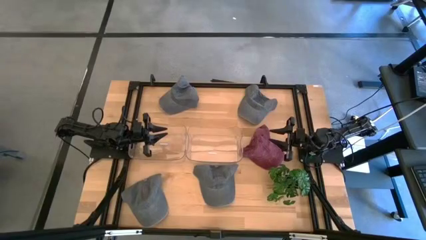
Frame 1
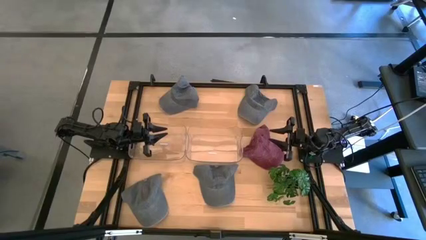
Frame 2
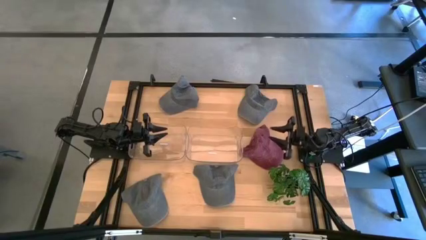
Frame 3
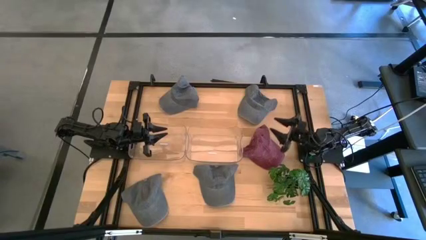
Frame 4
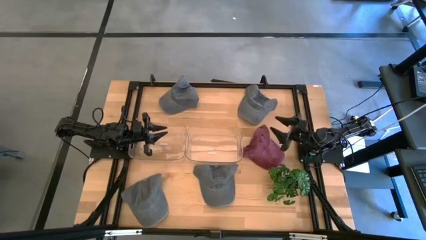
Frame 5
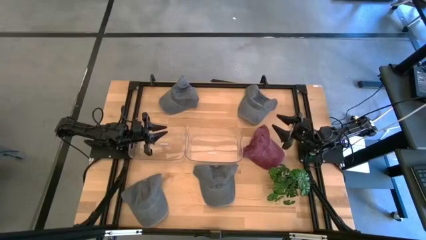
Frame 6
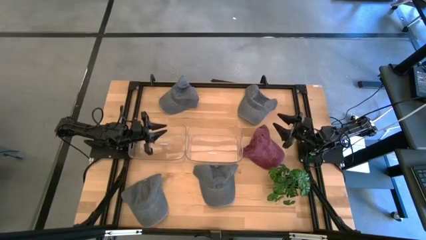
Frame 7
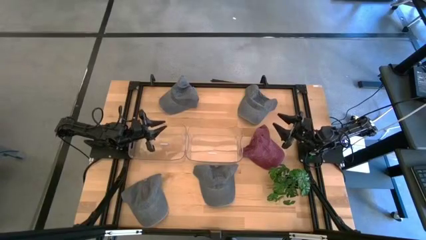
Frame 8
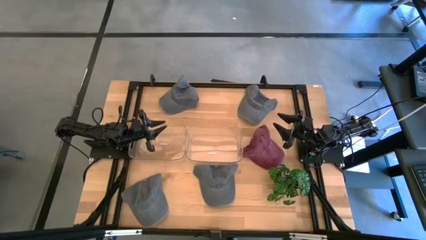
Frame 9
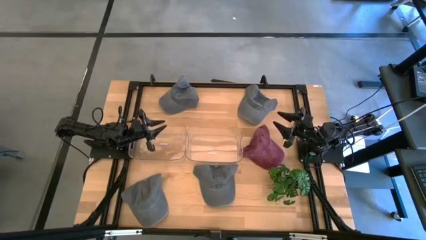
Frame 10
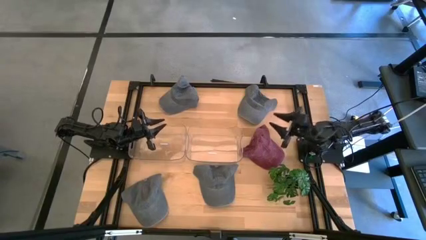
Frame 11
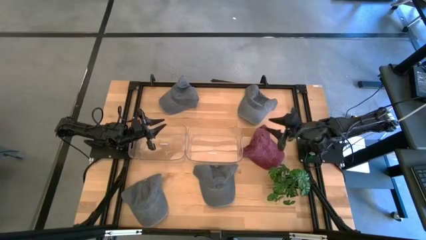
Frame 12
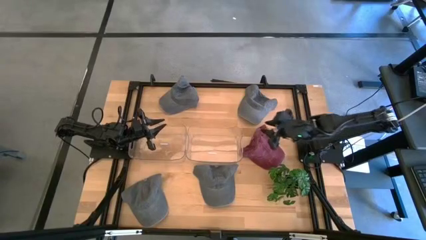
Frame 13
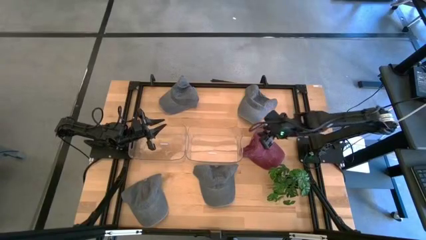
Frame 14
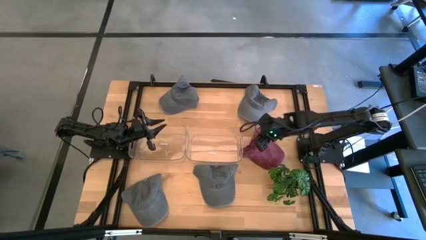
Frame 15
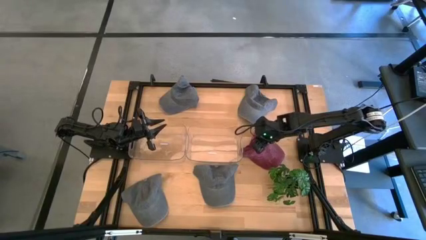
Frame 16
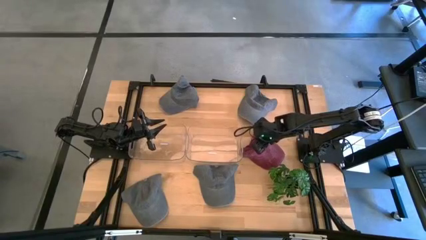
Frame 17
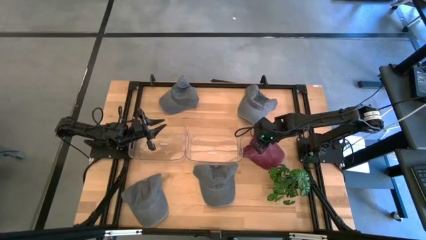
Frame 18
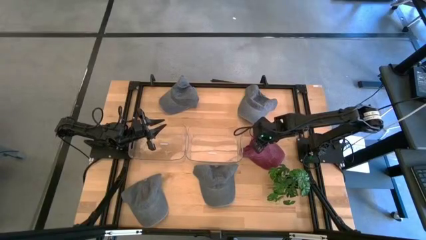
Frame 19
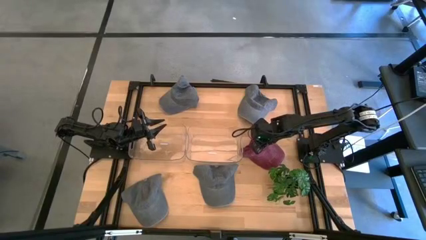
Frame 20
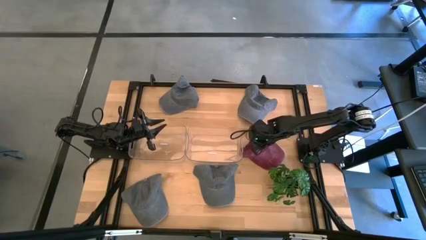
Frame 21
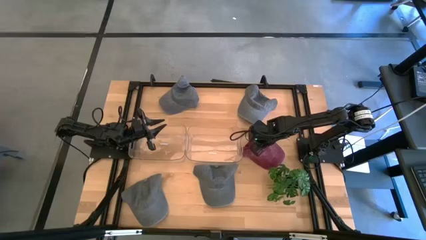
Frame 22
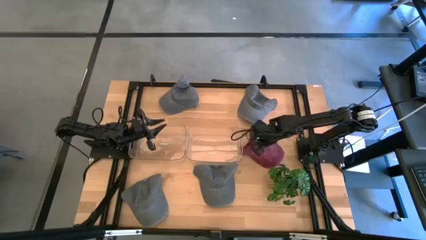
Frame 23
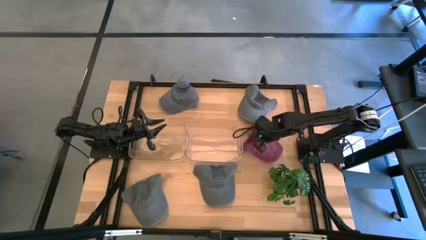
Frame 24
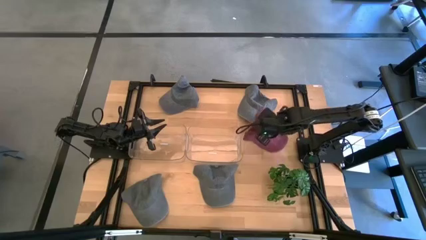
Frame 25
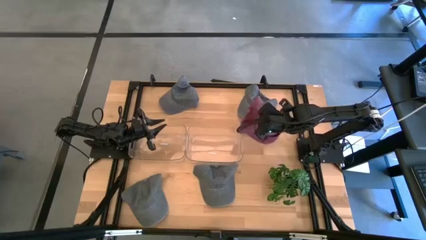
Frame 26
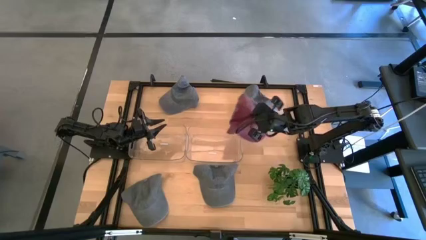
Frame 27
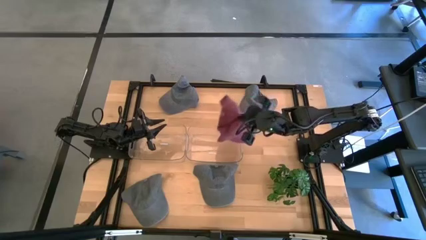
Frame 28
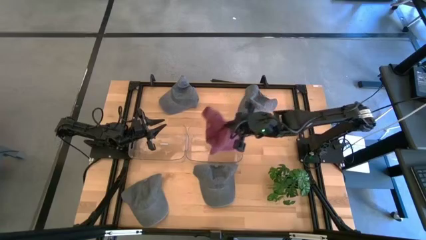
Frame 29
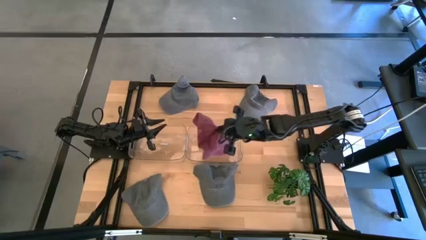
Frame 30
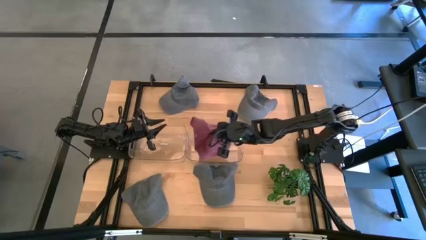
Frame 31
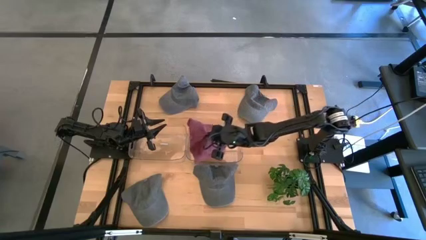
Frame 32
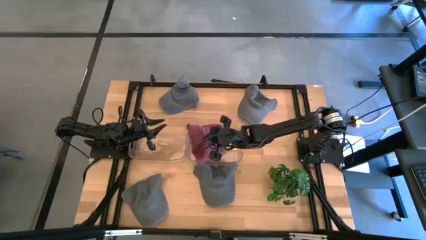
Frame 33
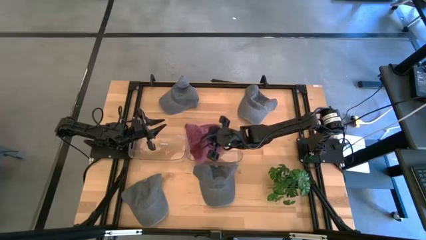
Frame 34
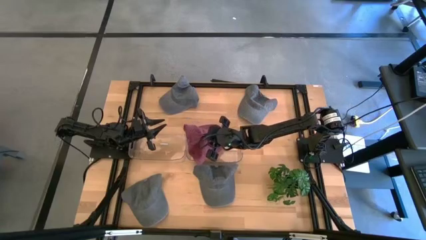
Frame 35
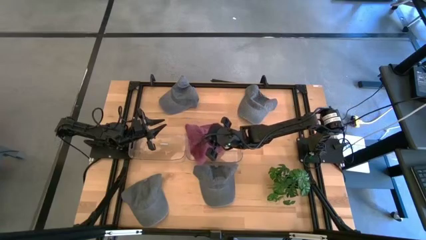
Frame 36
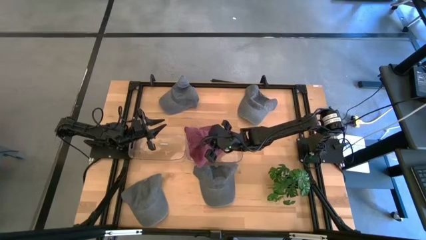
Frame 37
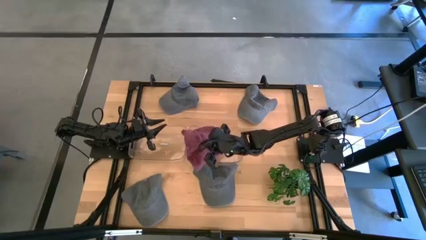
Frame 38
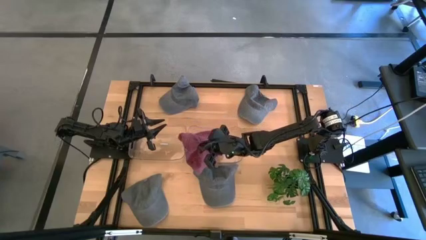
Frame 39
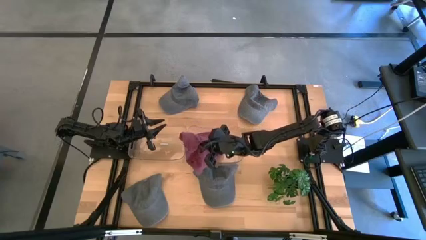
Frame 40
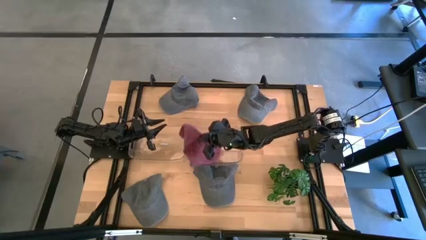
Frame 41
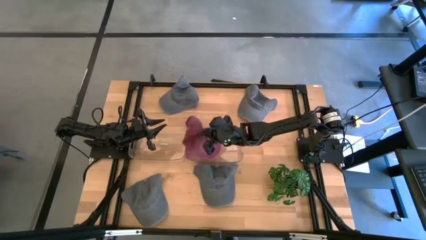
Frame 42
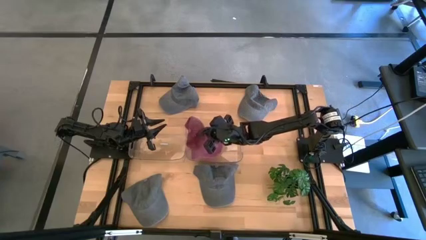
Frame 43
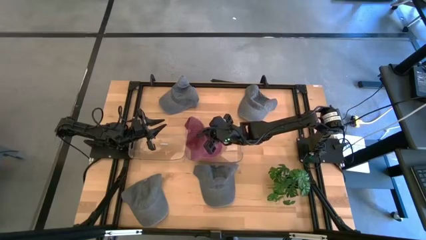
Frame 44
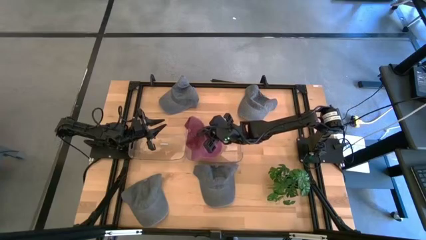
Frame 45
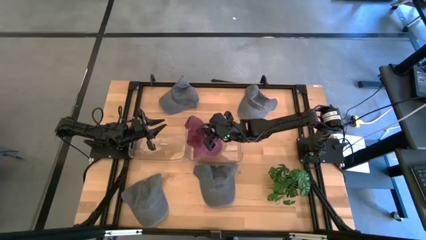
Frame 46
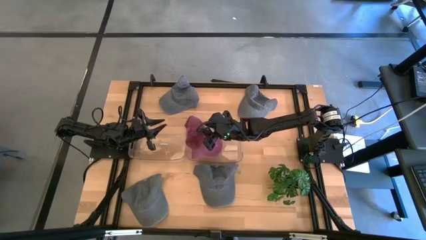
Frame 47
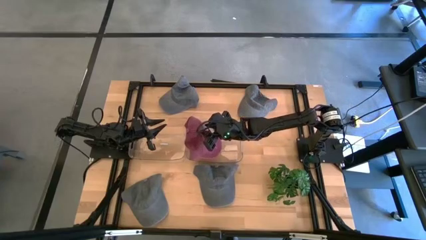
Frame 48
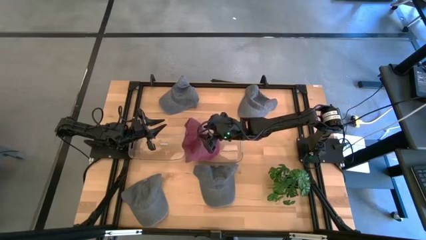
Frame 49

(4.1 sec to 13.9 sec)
Task: Pick & Place hat
Put the red cap into the right transparent bin
